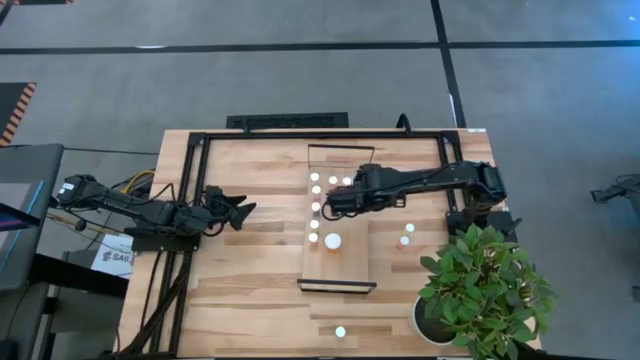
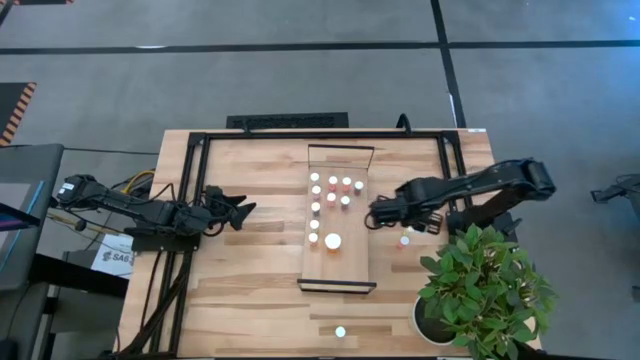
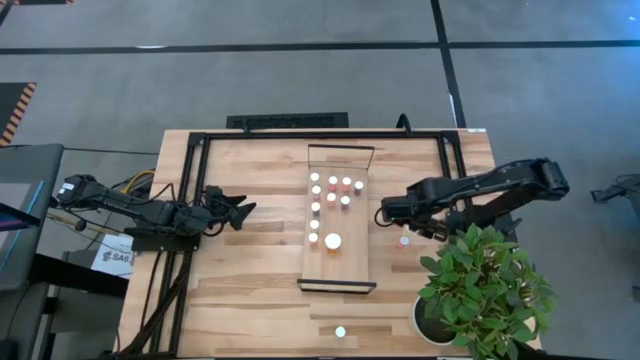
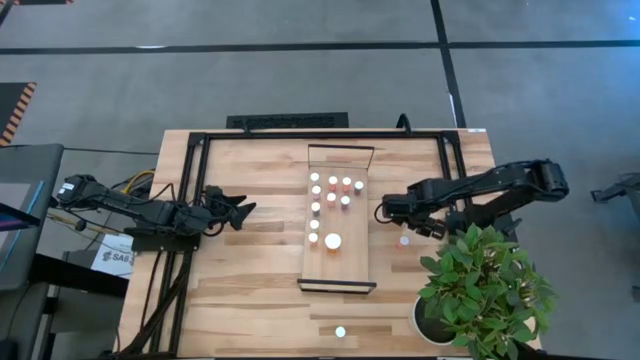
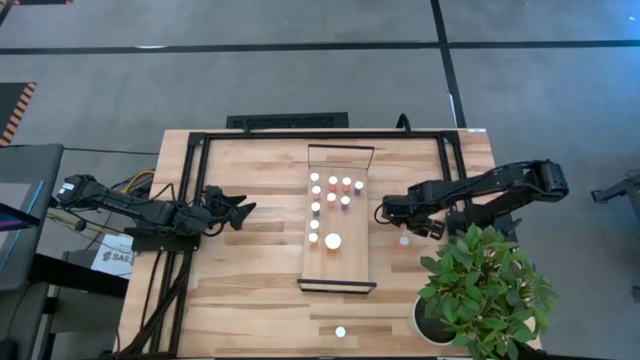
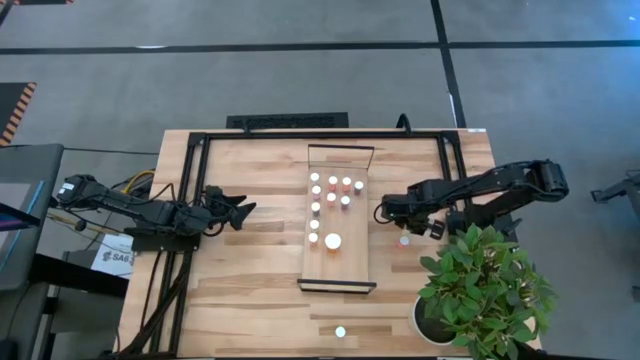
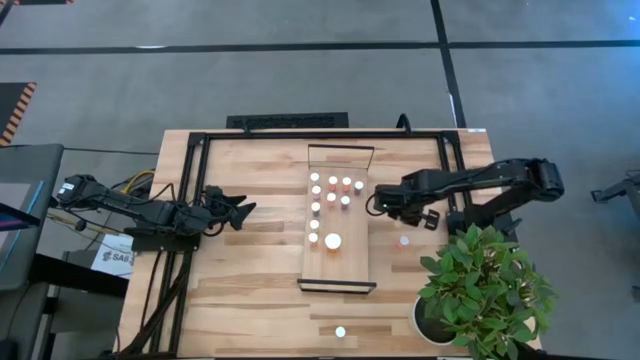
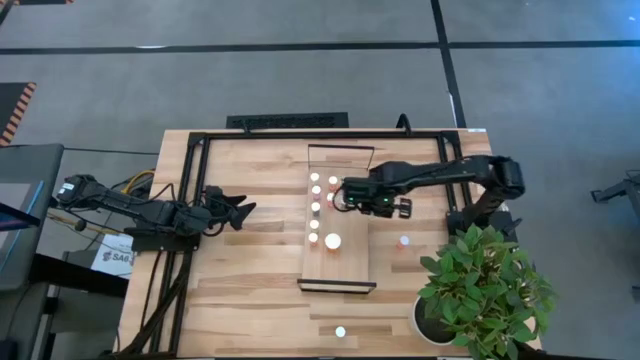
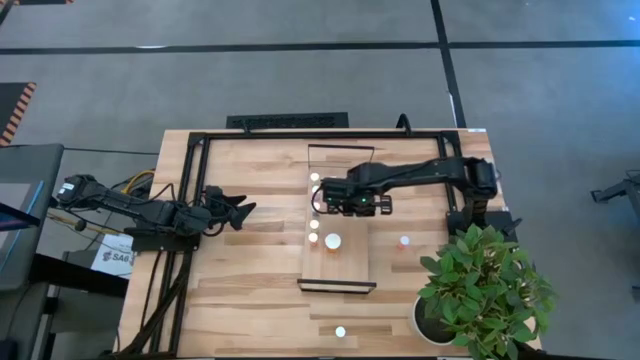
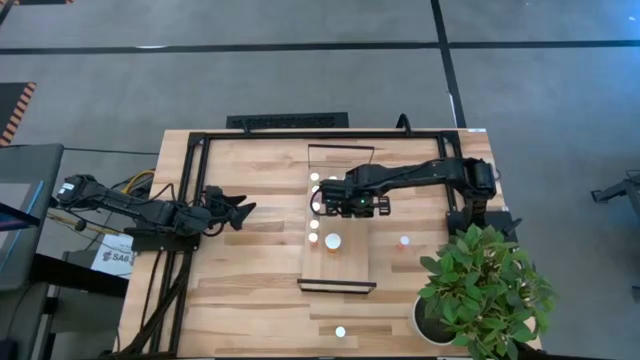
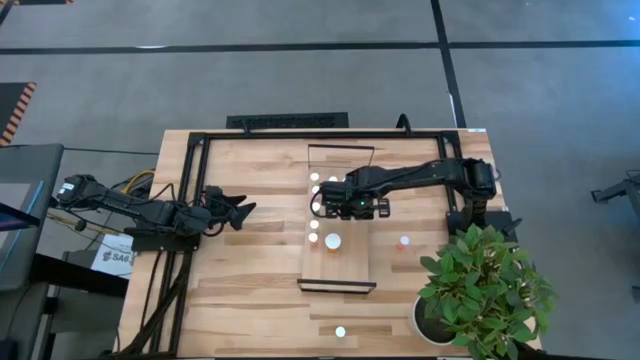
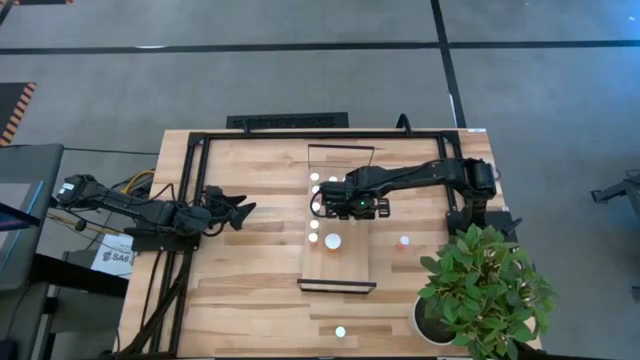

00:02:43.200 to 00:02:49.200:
Task: Pick and place medicine bottles onto shelf by color
Put the yellow pill bottle on the shelf

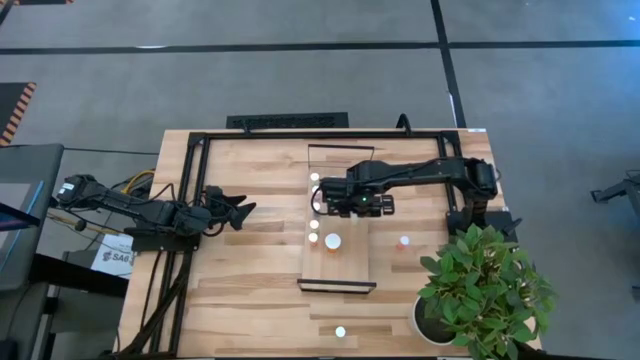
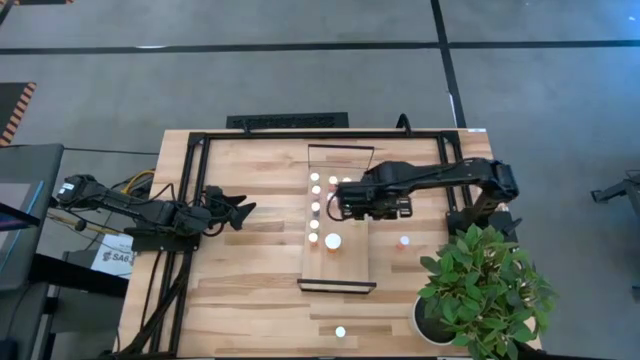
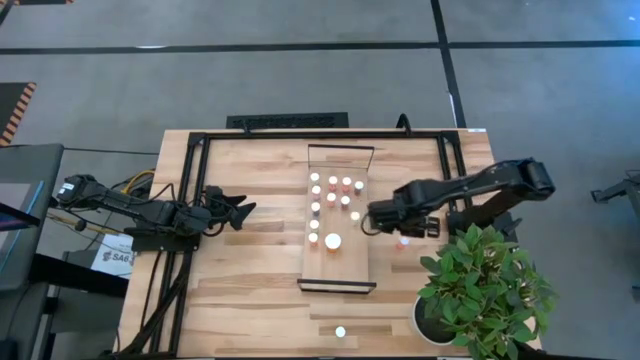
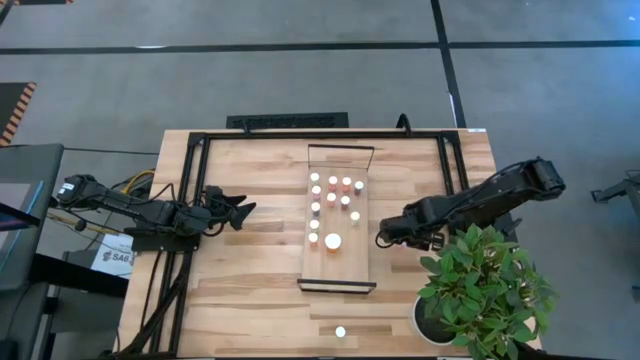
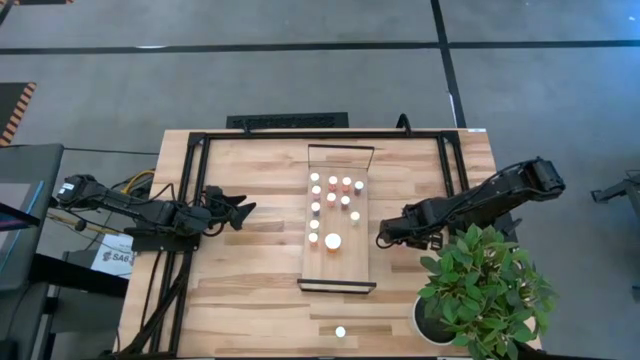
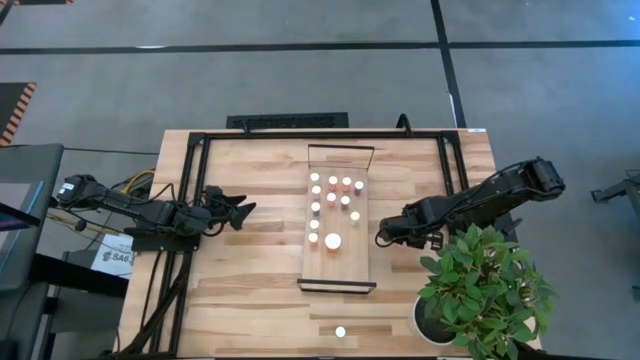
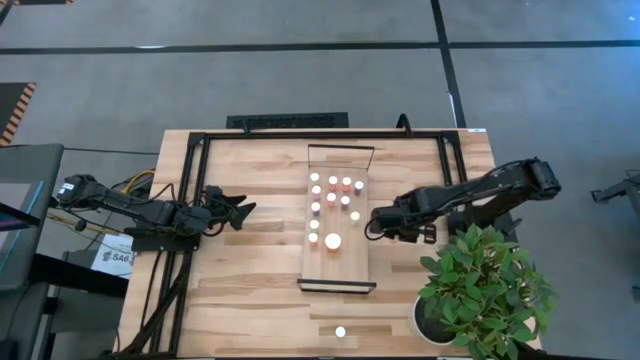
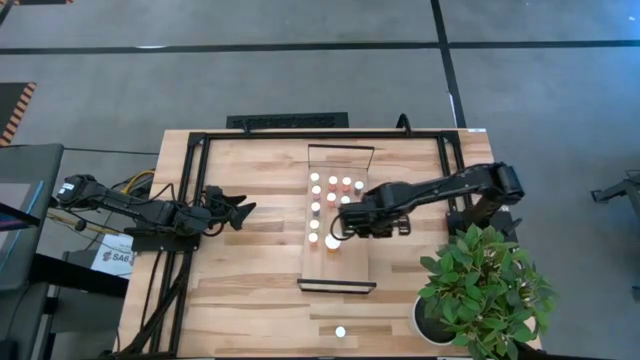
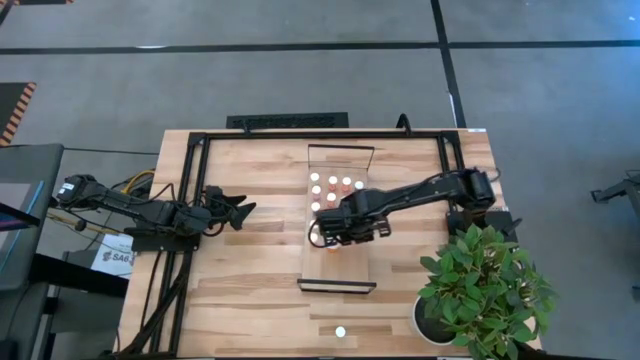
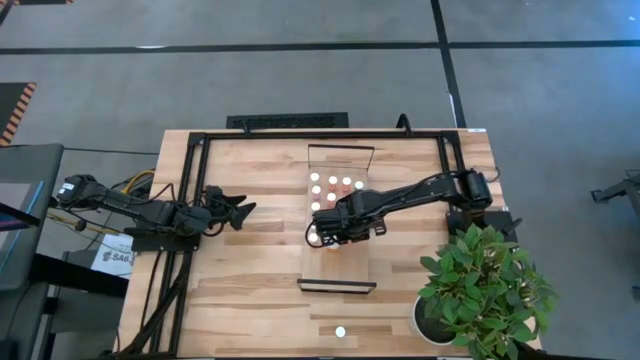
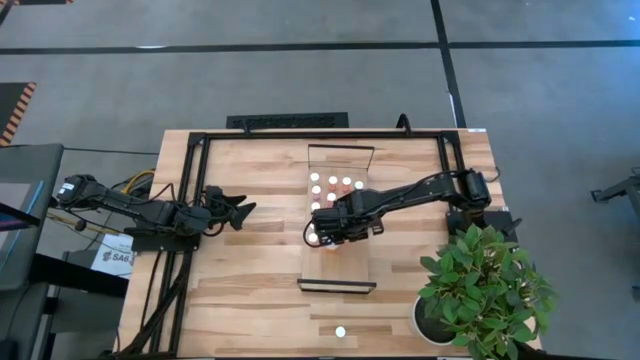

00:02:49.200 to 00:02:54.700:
Put the pink pill bottle on the shelf

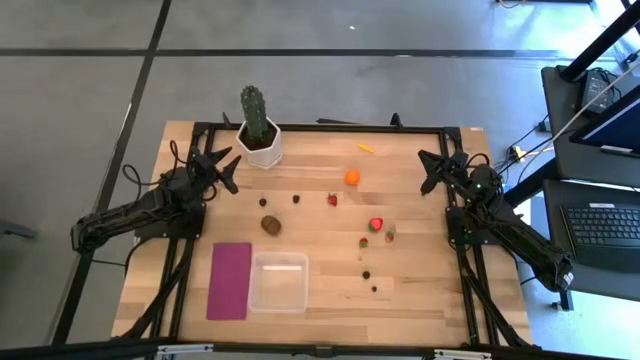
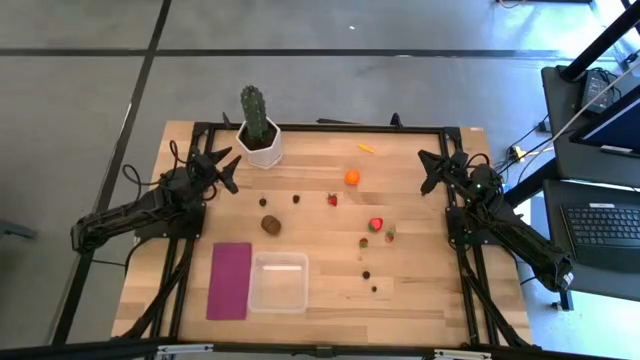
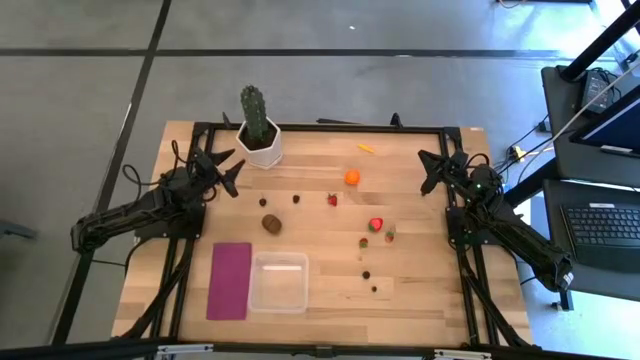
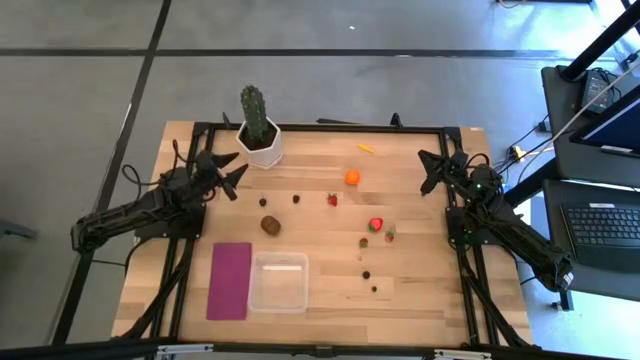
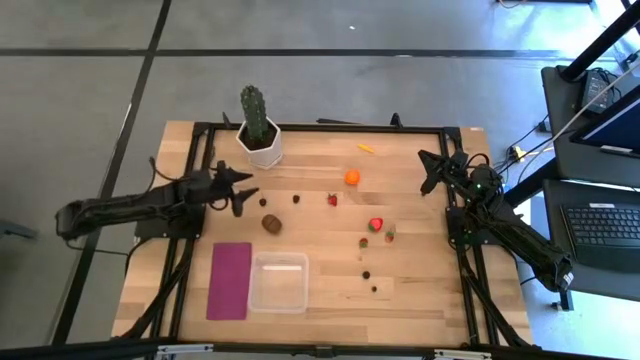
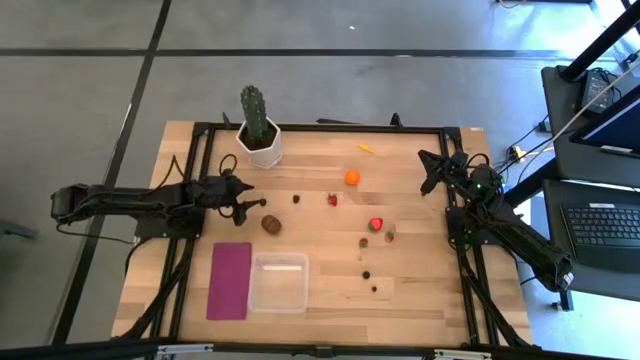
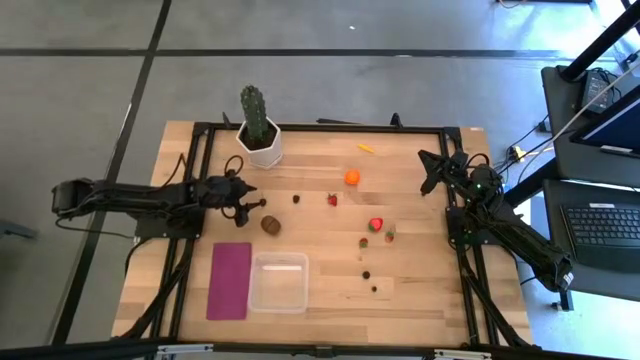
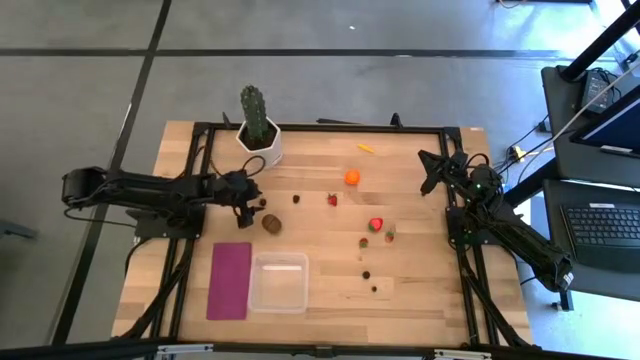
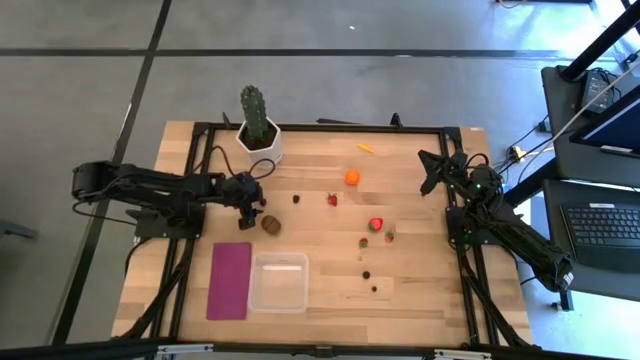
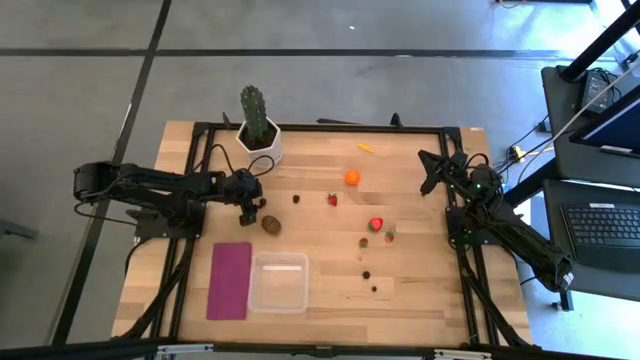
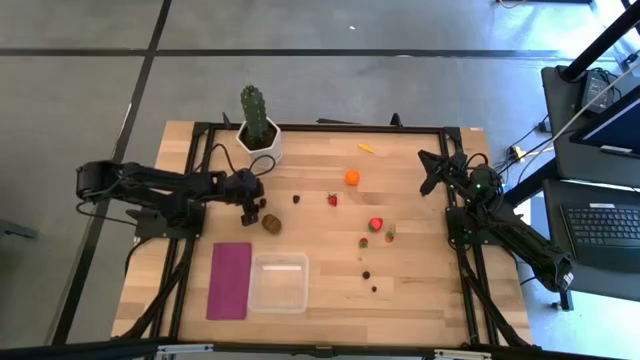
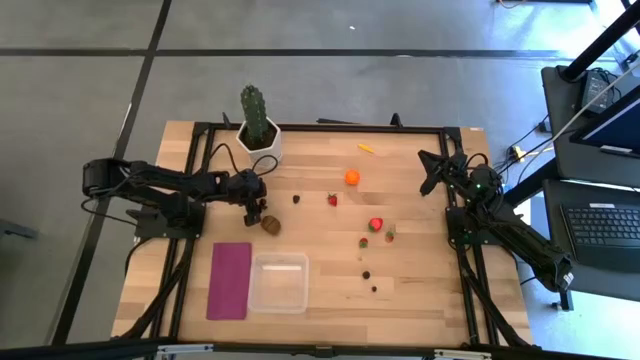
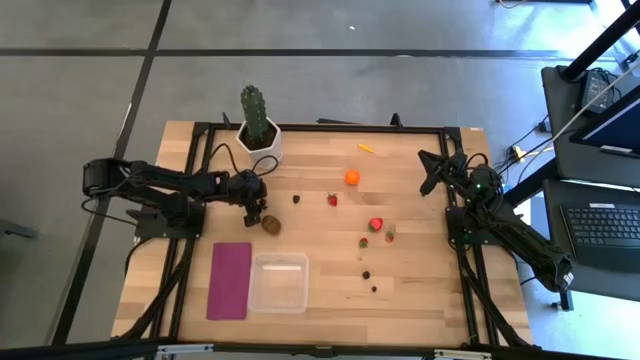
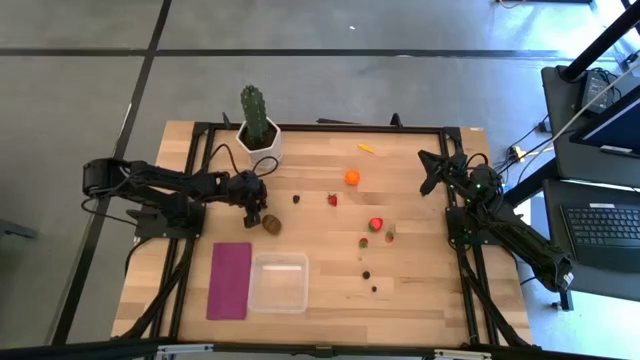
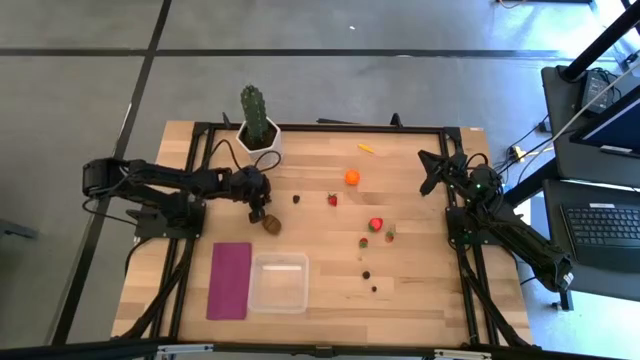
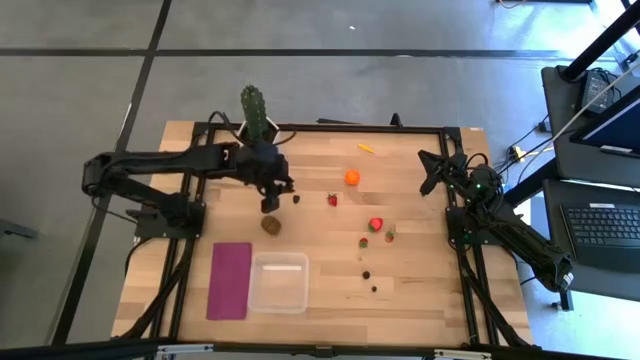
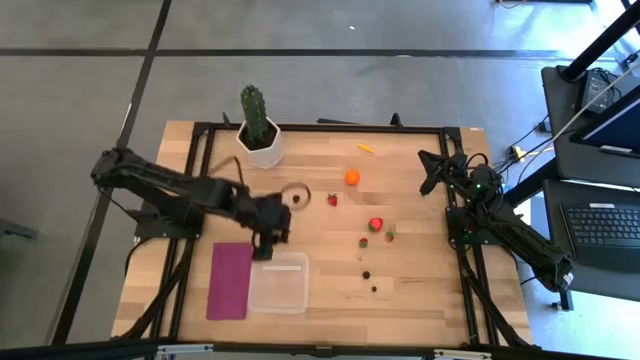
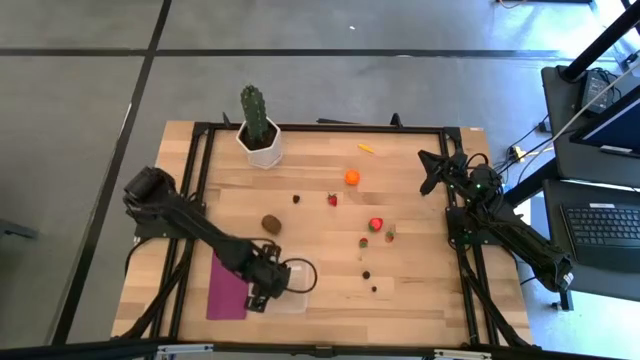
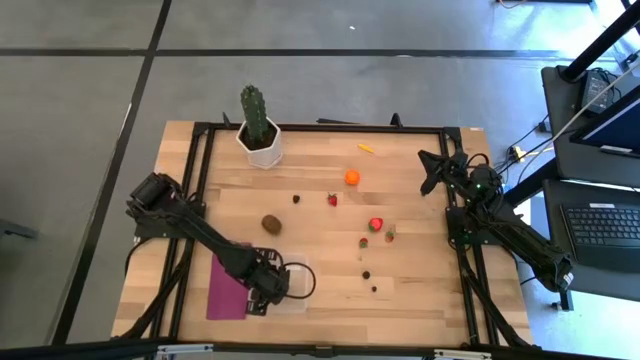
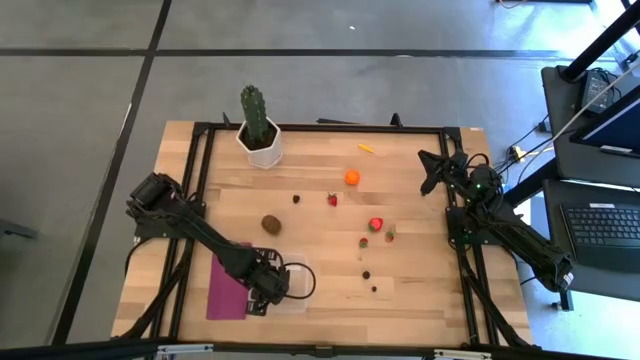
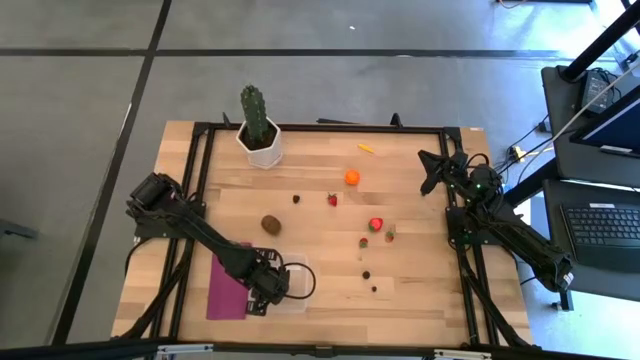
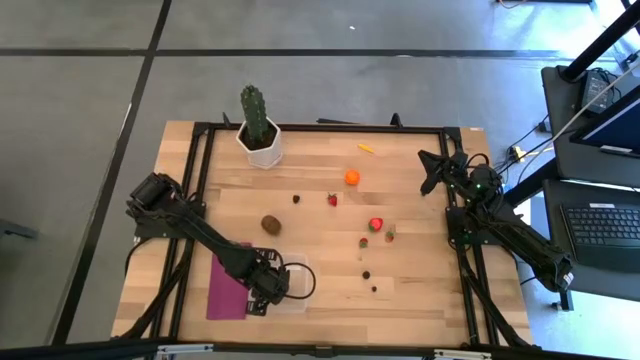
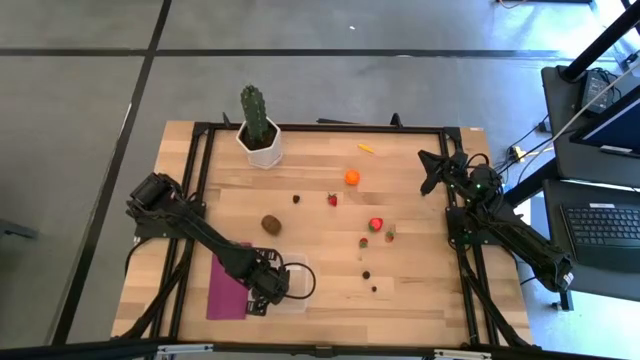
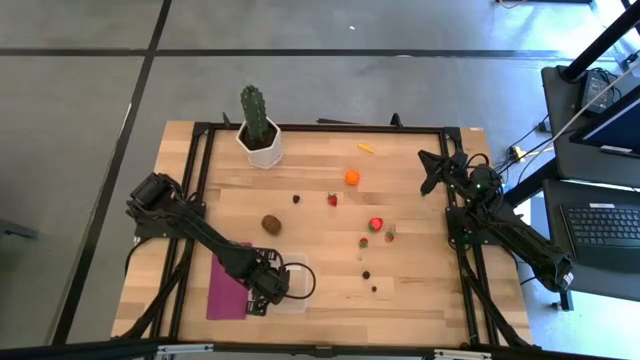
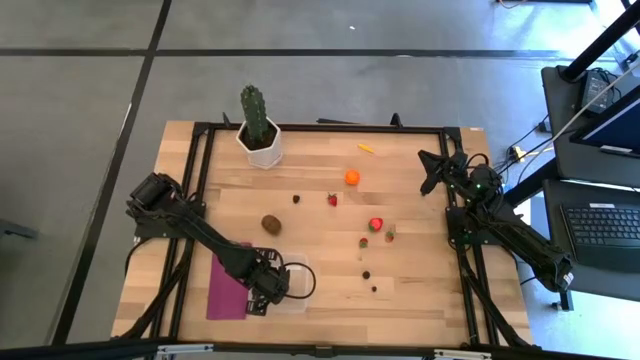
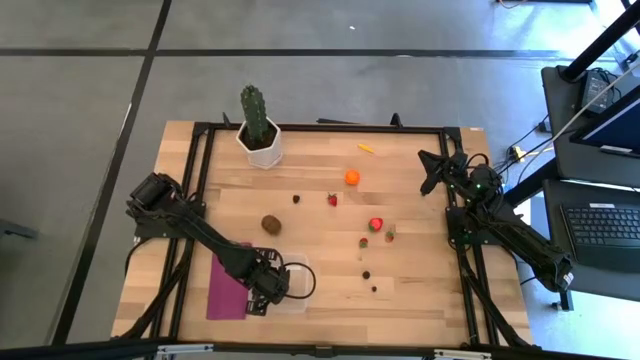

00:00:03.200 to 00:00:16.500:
Task: Pick and placing Produce into tupperware
Put the cherry into the transparent bin
